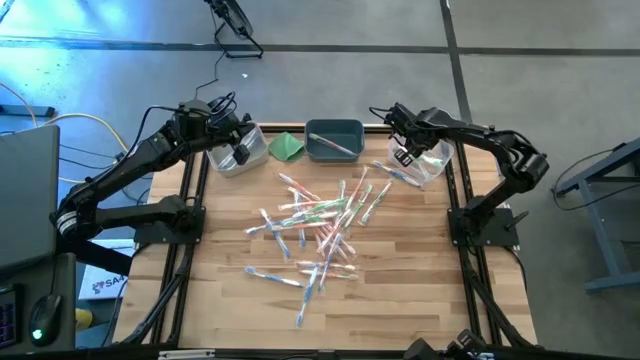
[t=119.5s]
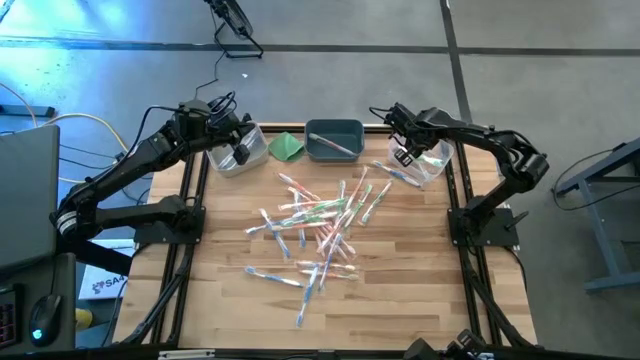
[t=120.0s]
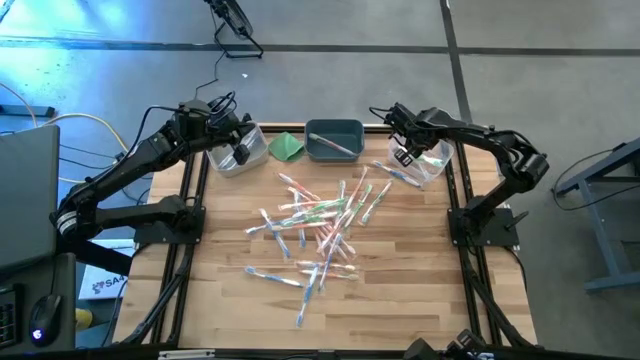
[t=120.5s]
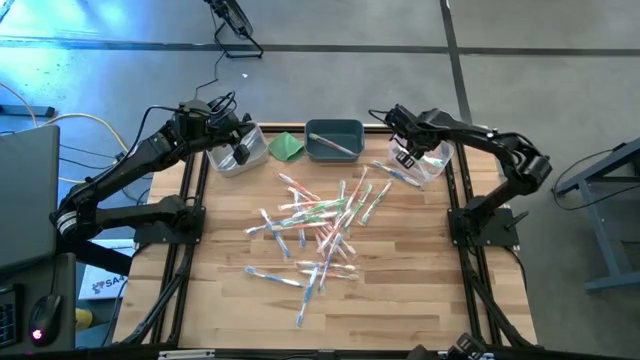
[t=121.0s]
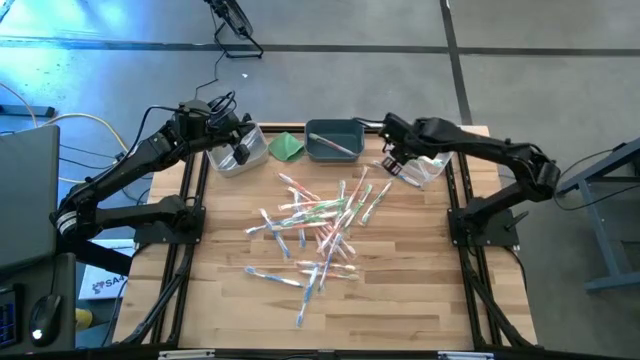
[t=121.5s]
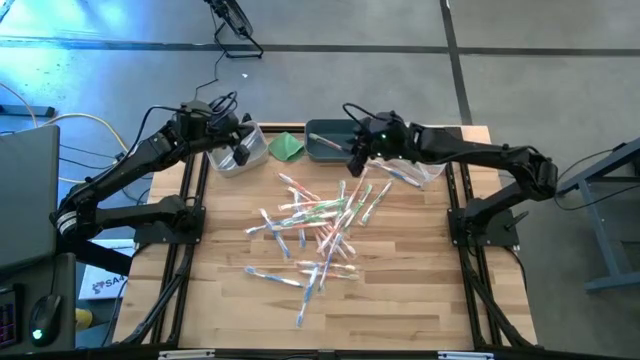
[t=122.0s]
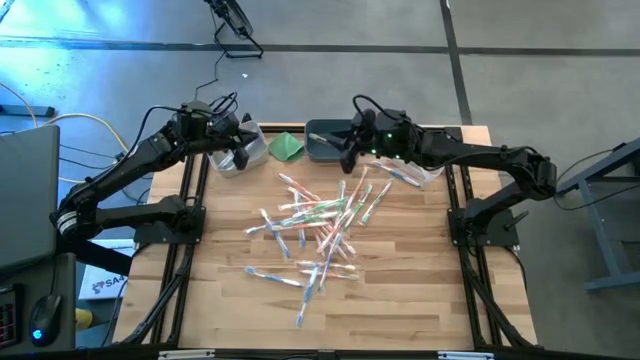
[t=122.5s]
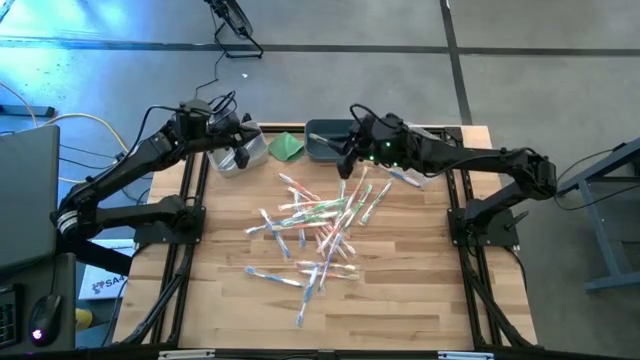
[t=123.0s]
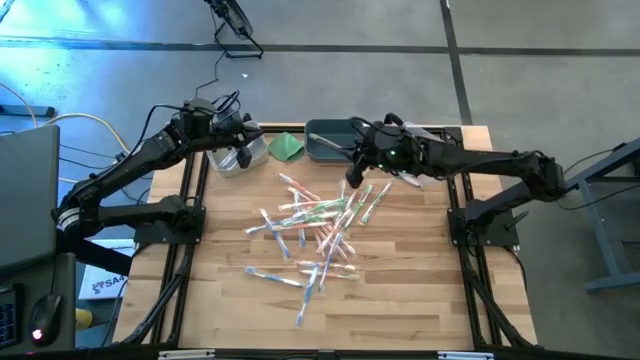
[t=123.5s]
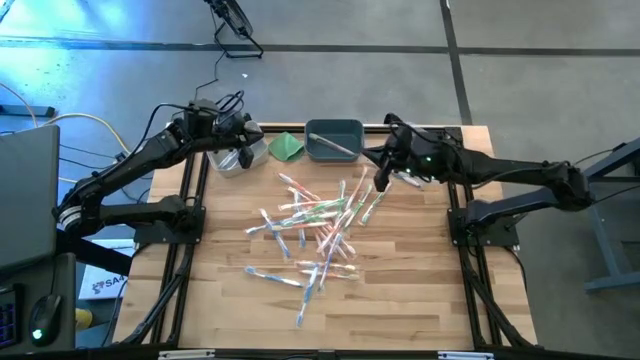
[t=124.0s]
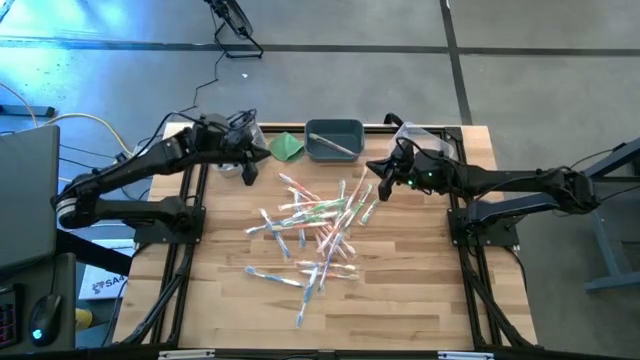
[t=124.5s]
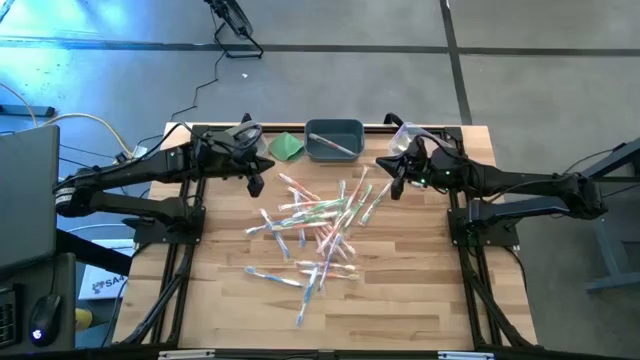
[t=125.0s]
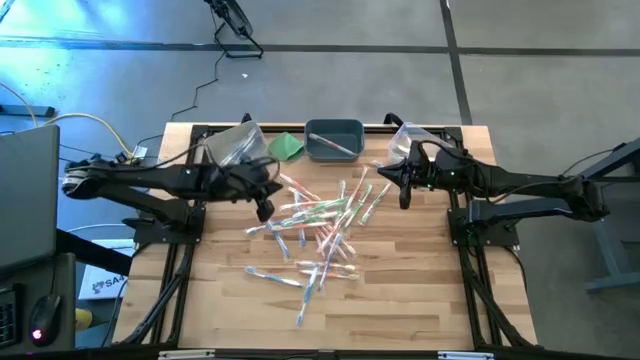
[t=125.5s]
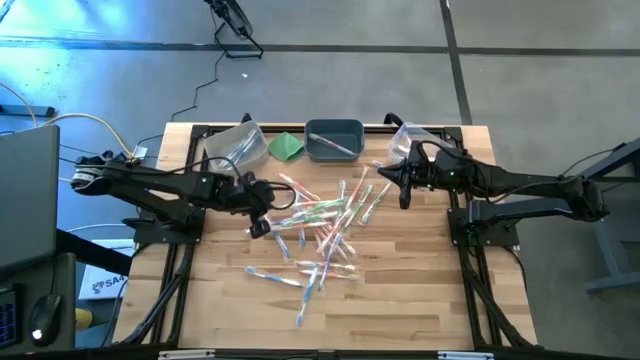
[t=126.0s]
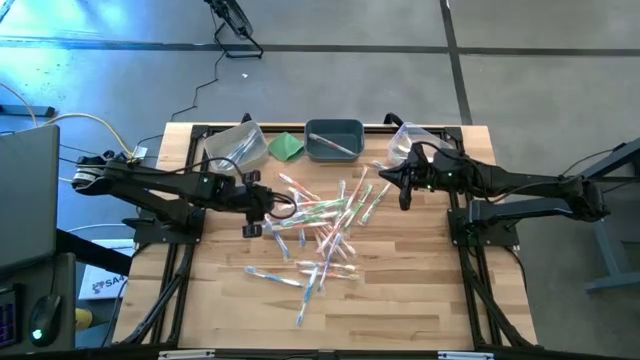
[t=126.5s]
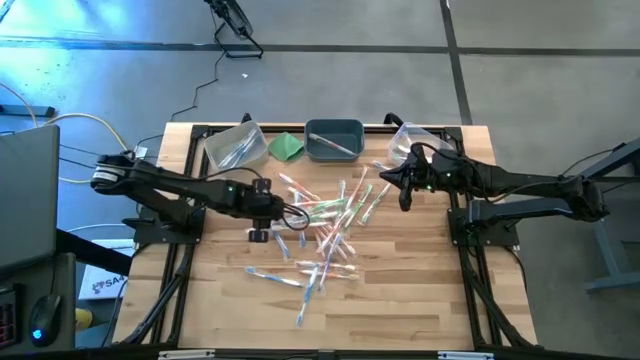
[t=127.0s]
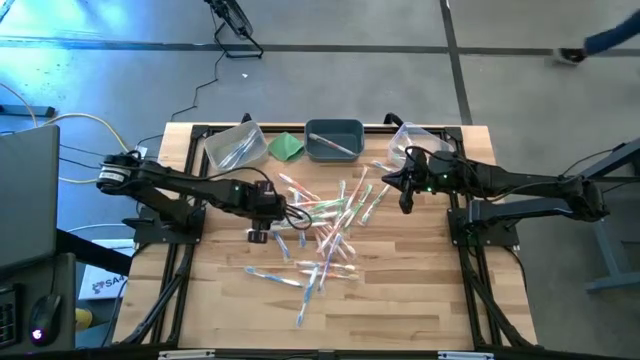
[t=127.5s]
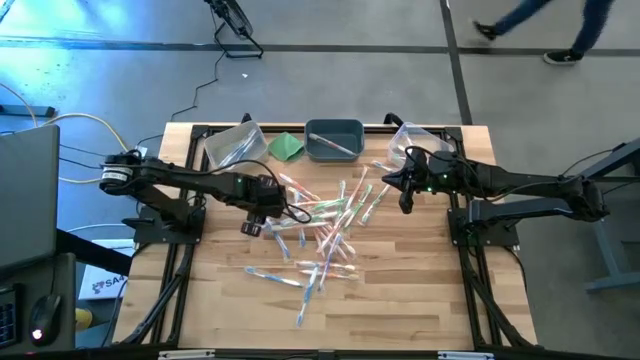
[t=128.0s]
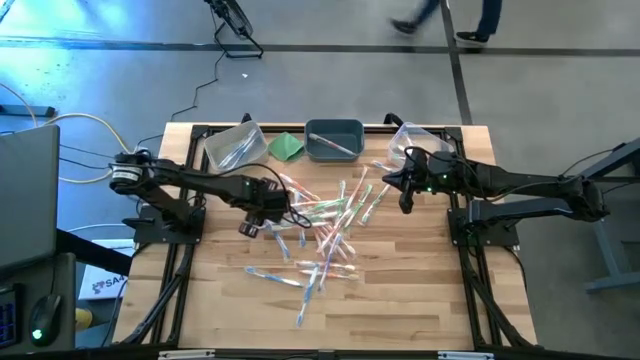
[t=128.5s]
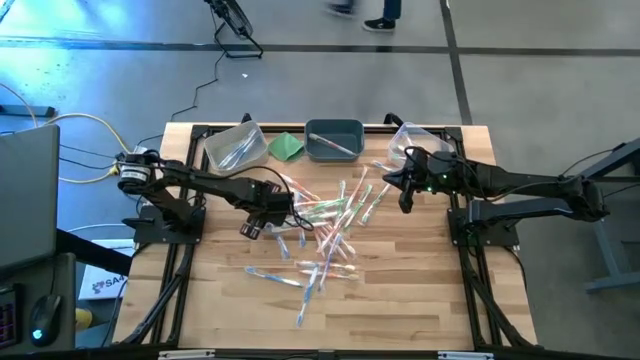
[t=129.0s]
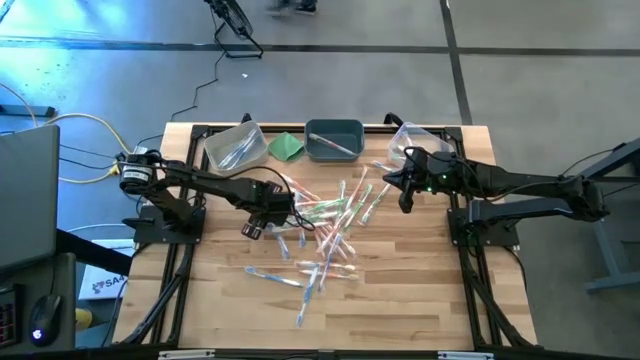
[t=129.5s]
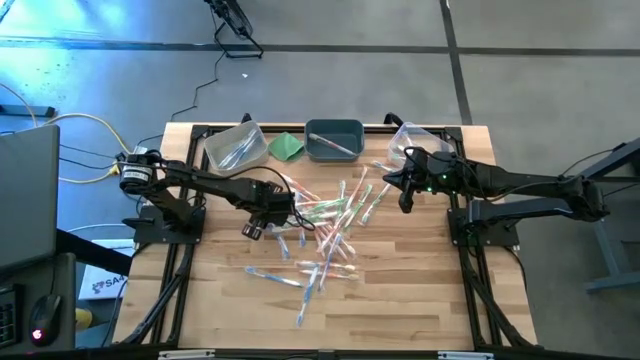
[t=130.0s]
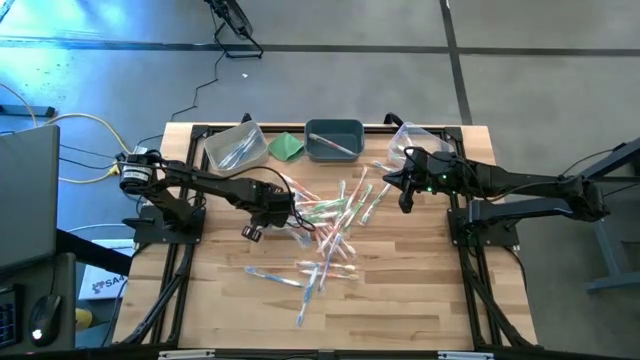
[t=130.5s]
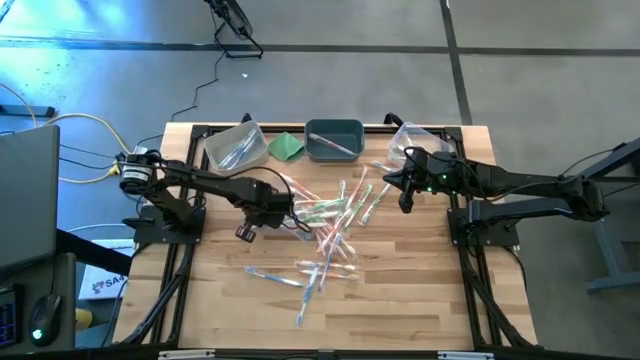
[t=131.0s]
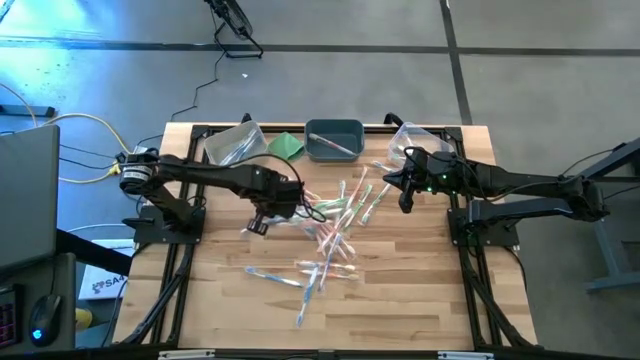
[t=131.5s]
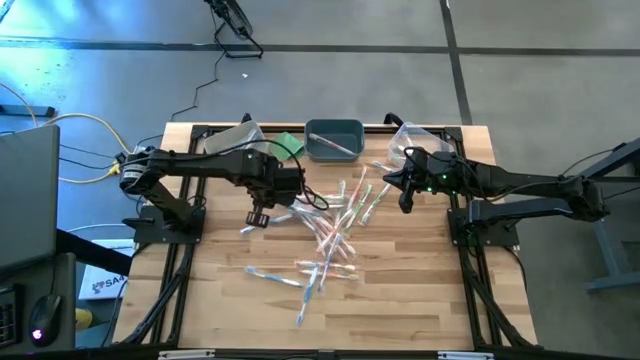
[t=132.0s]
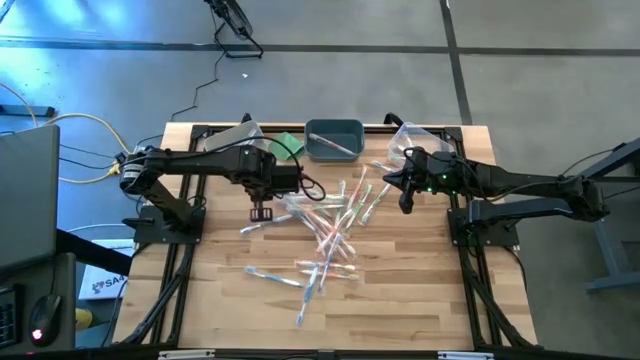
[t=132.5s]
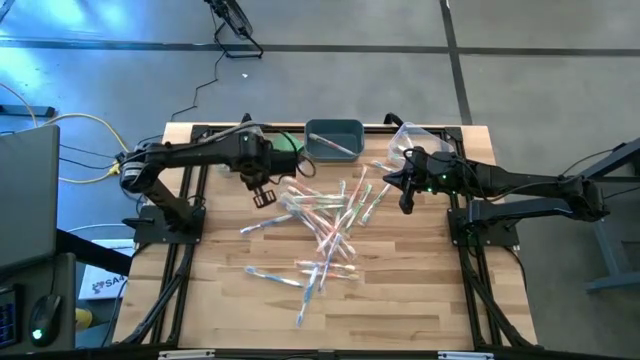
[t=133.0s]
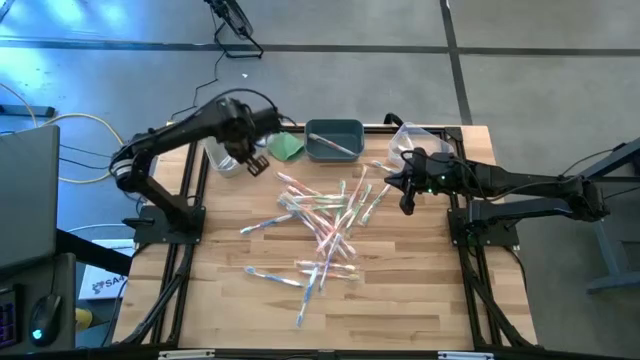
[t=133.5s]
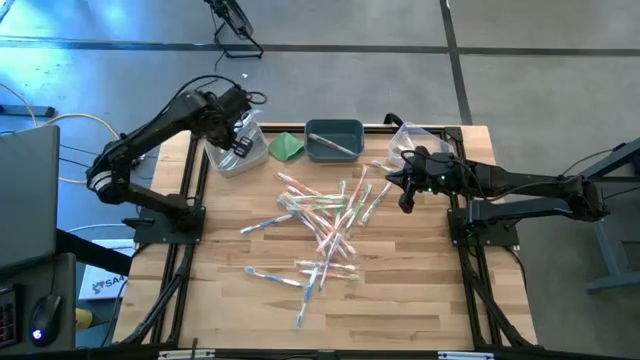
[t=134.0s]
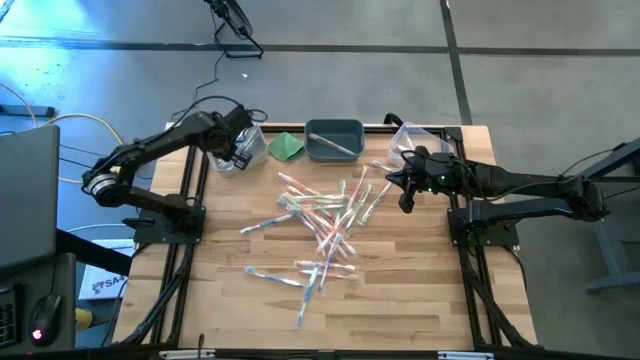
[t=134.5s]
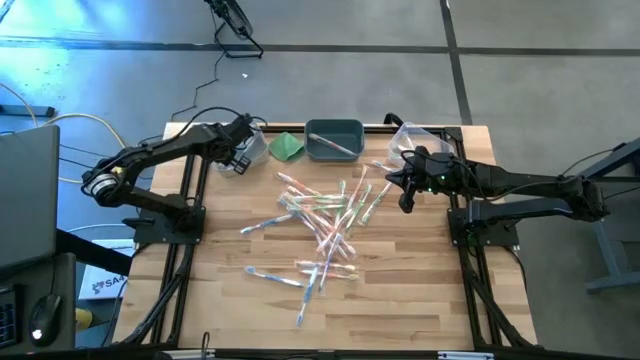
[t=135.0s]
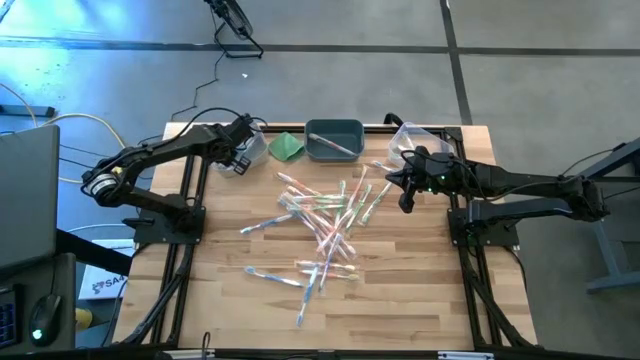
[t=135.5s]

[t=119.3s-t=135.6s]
Task: Pick & Place Toothbrushes
Put the blue toothbrush into the gray bin

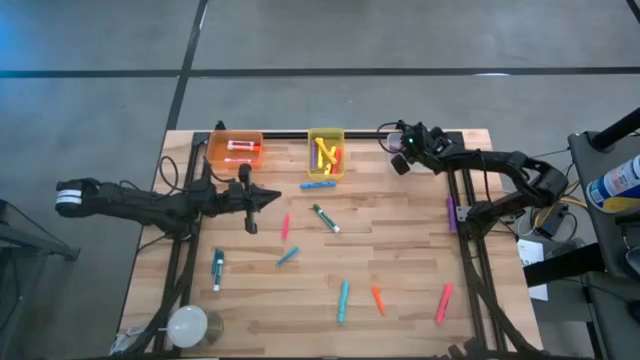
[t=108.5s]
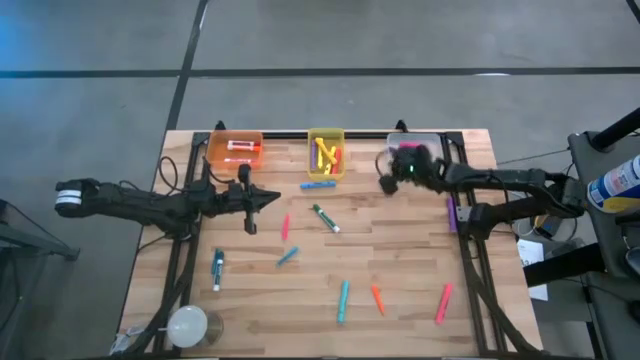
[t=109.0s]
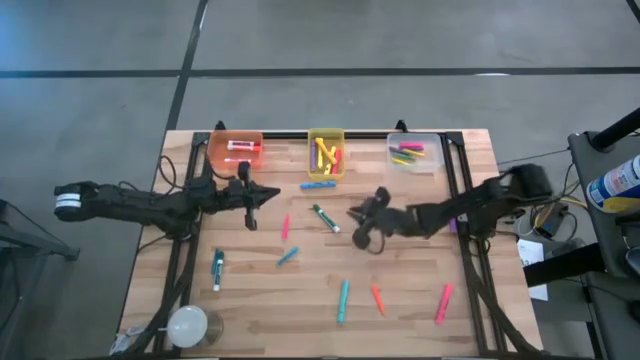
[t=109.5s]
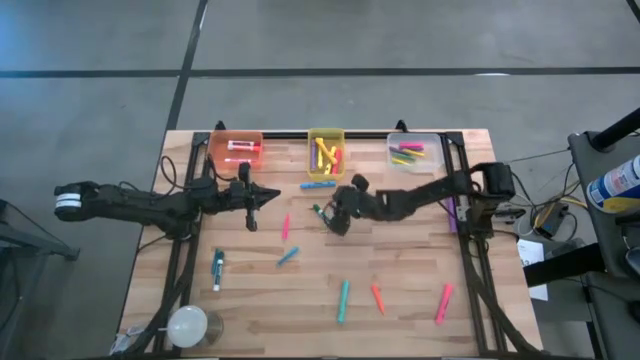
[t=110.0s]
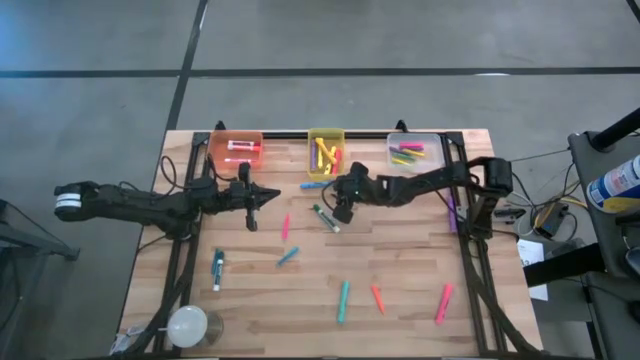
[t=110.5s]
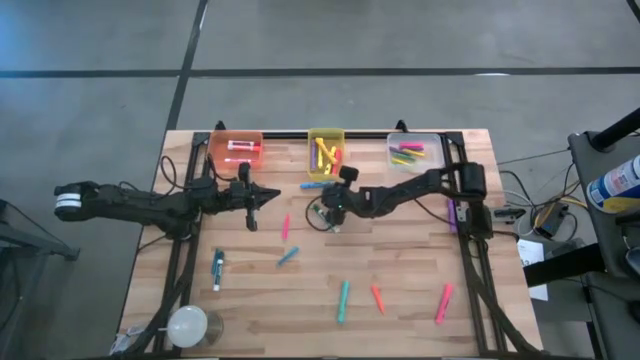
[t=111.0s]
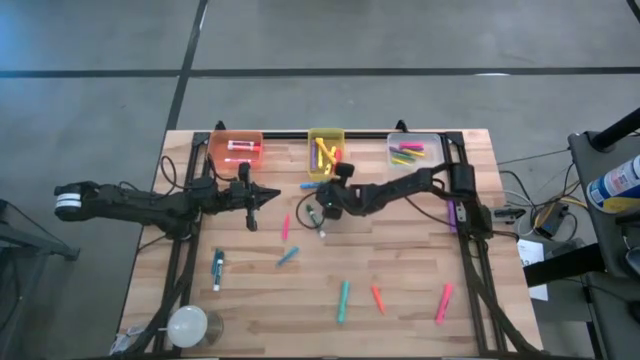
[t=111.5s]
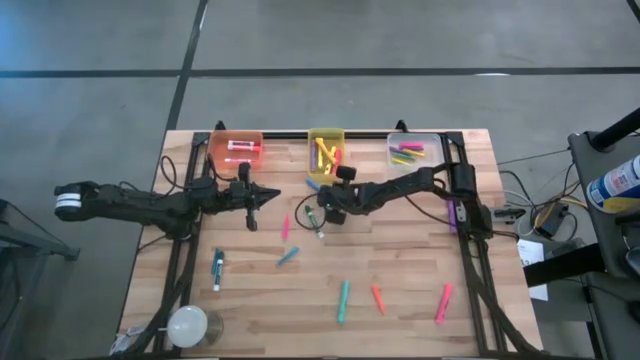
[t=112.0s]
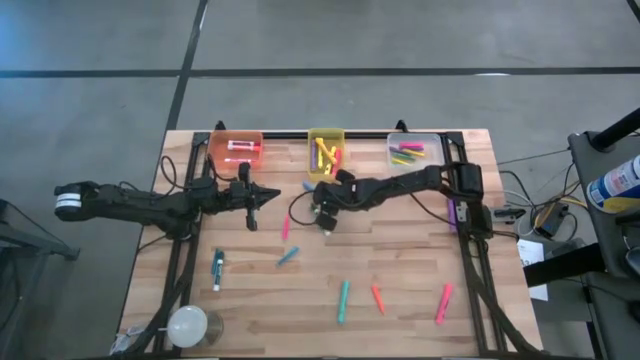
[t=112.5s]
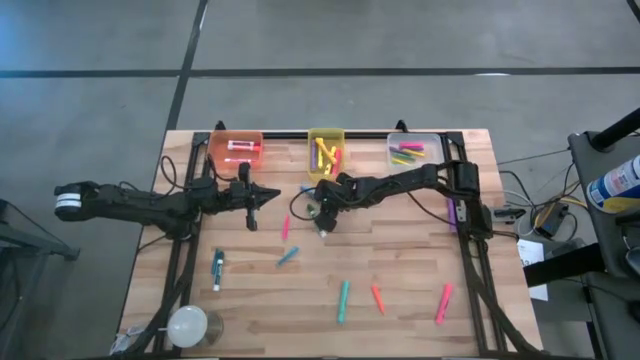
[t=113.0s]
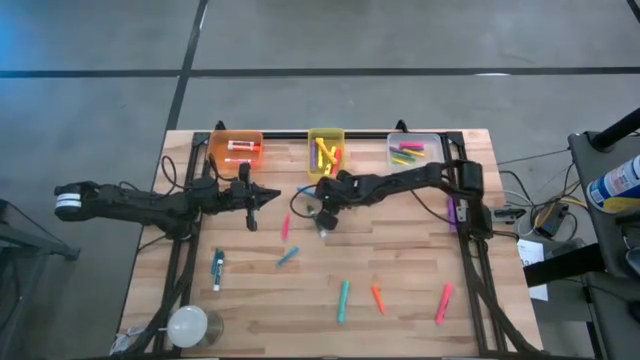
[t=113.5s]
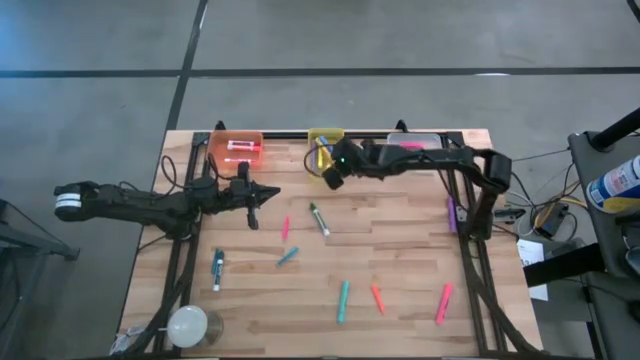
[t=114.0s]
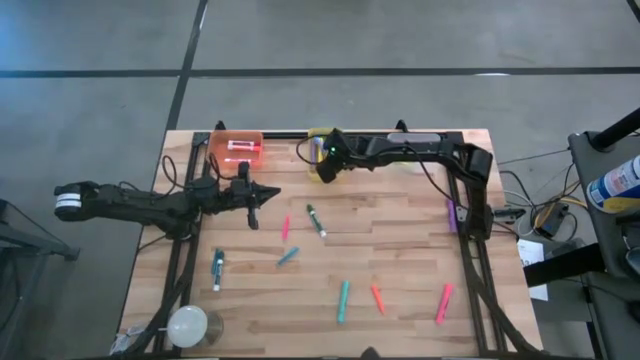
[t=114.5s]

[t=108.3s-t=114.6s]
Task: Pick & Place Markers
Put the light blue highlighter pen into the yellow bin
